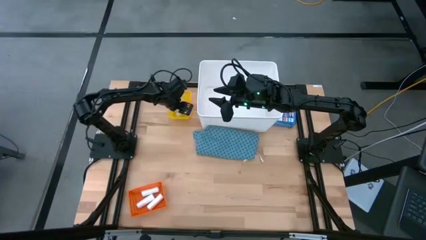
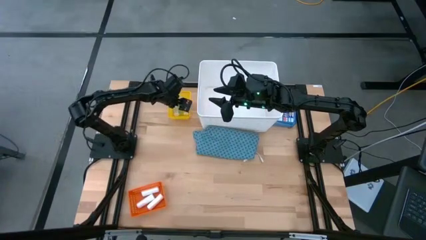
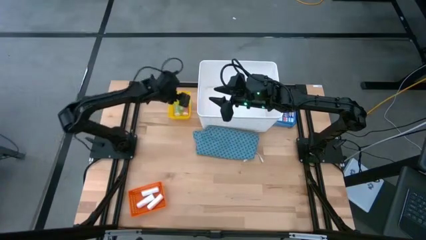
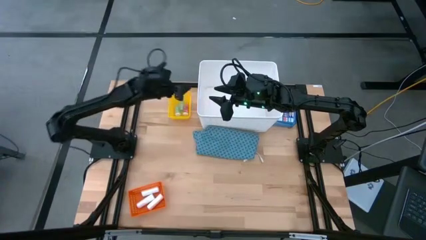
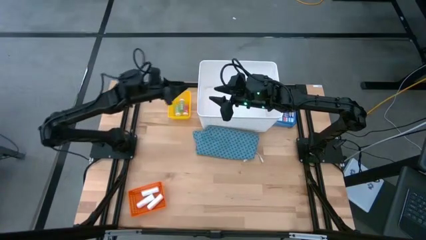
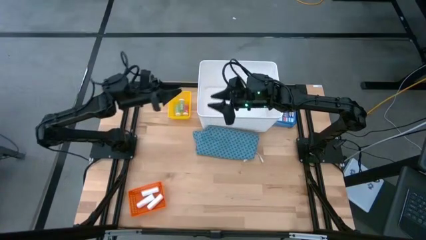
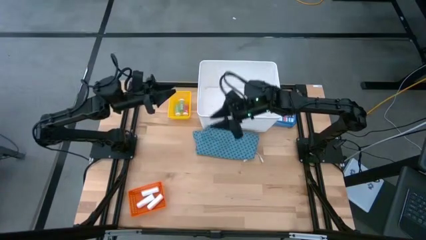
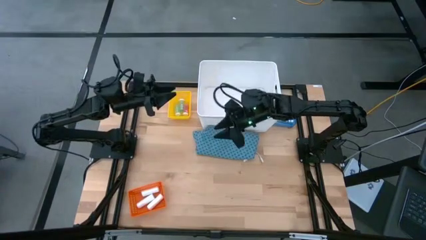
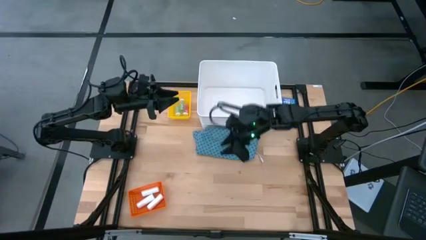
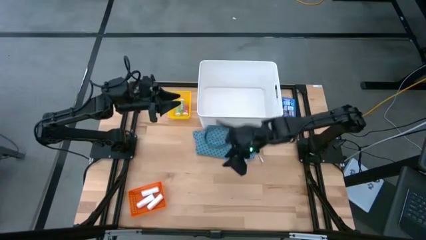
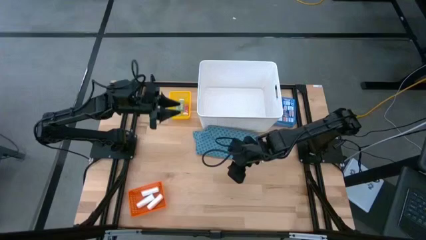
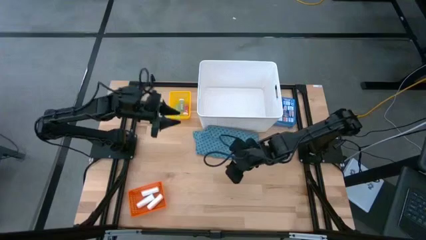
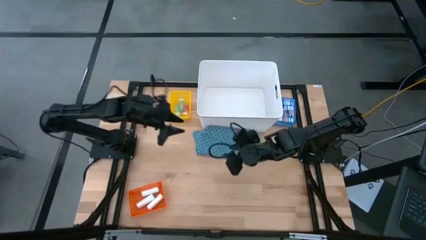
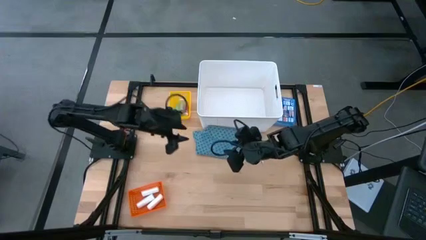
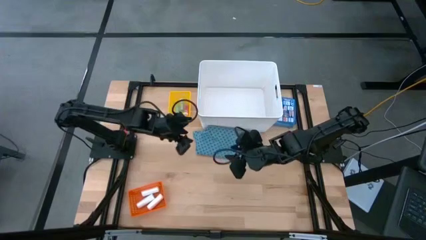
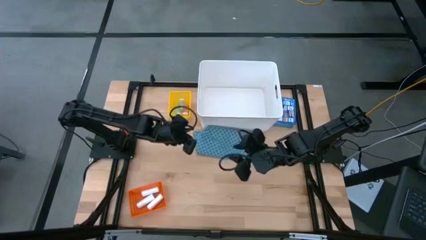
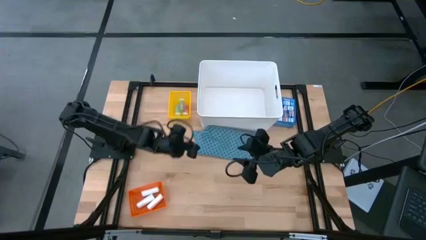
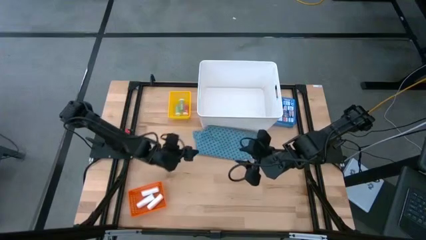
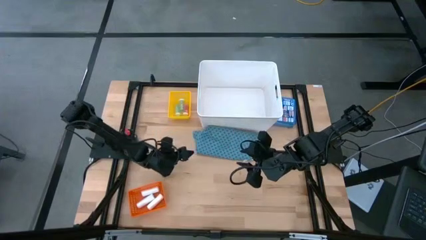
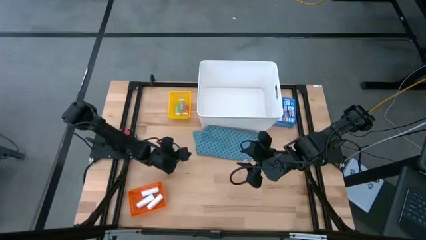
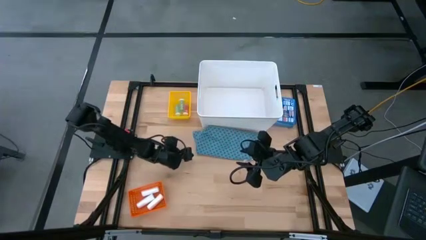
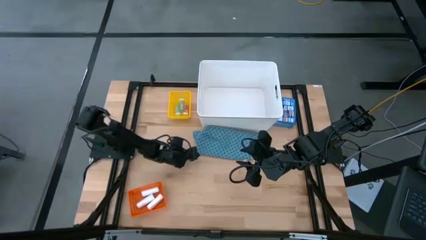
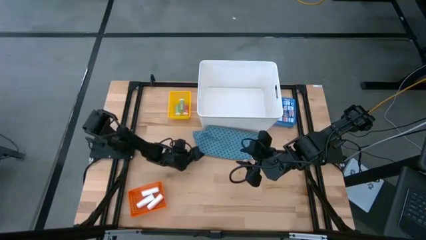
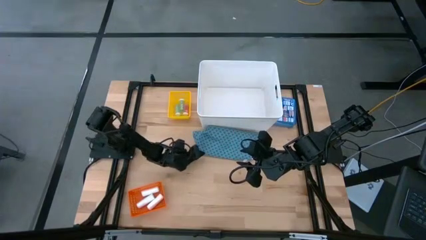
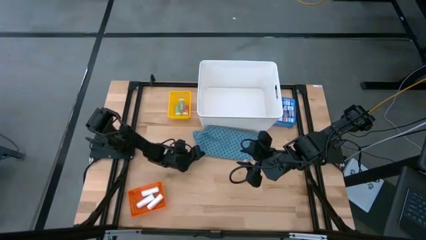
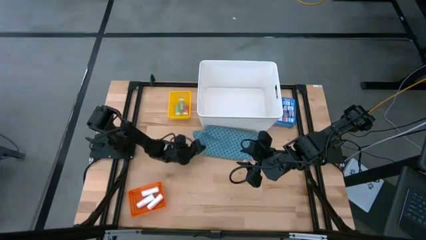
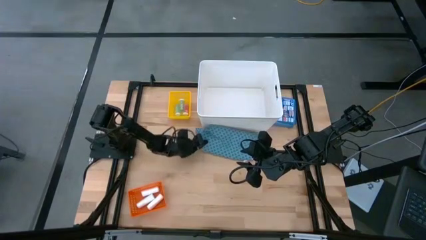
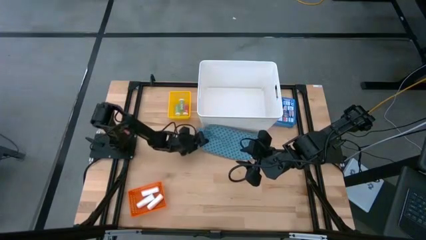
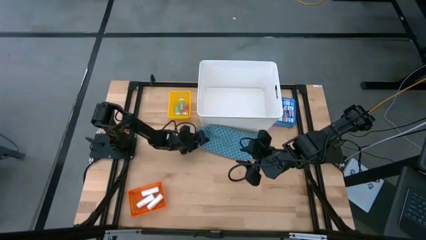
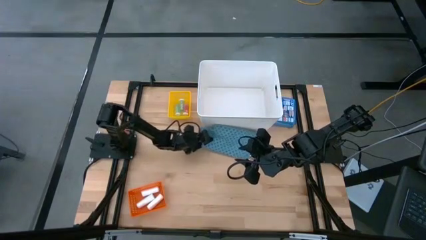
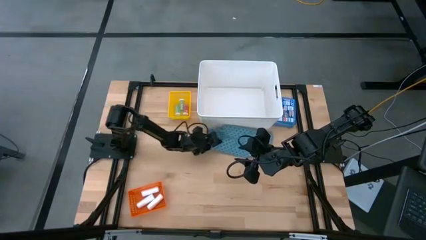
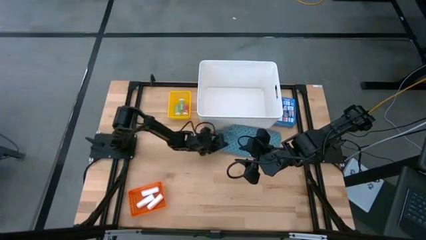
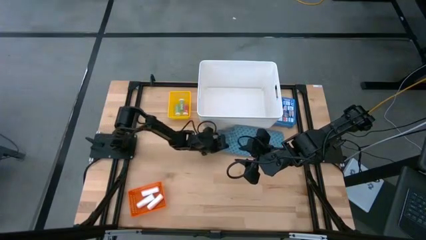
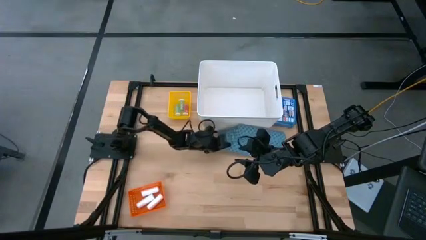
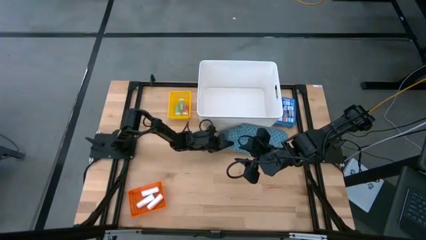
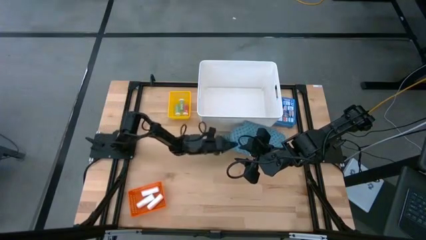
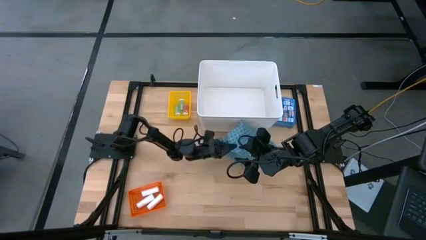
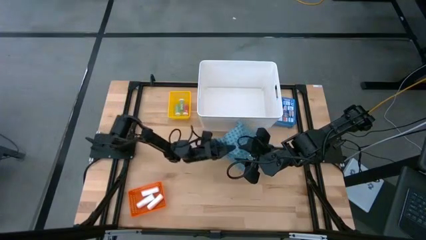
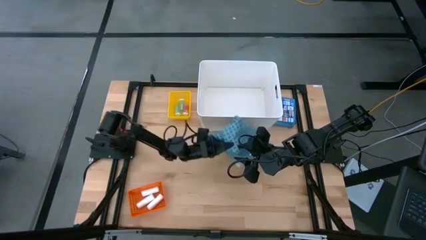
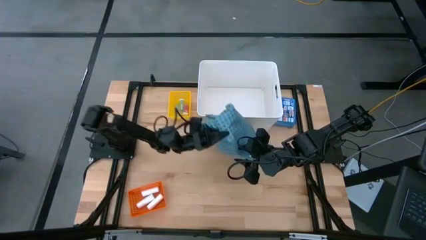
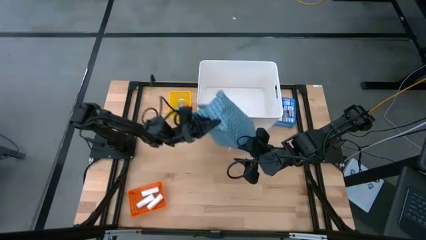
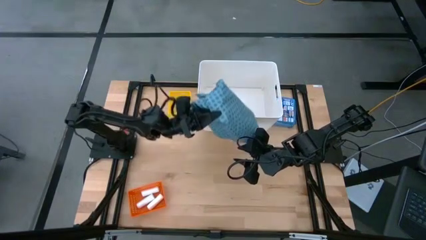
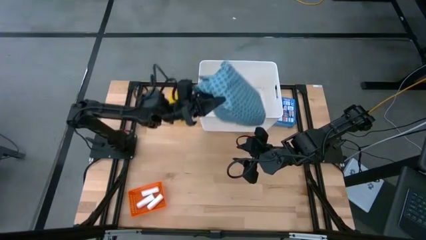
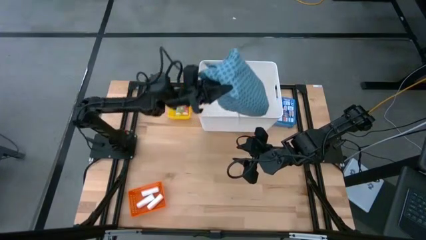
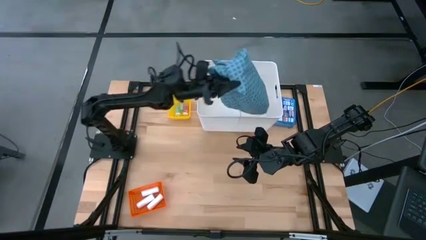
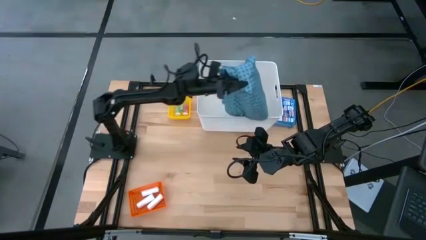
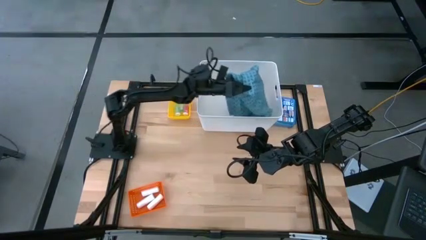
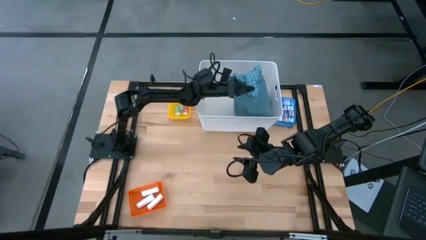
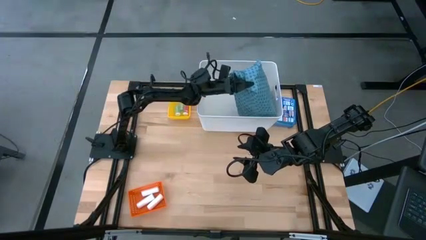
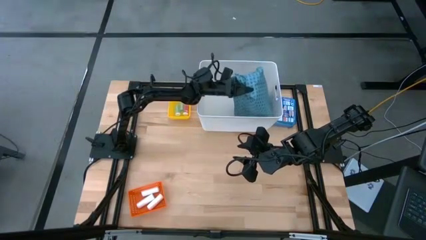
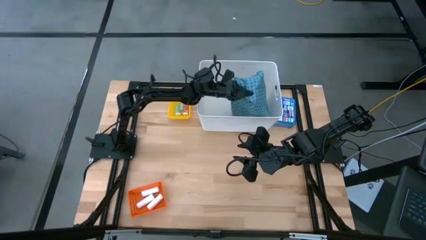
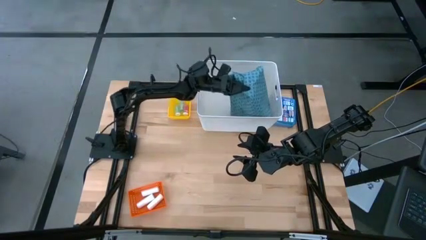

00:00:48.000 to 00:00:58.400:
Task: Pick & place medical supplies in basket/bin
Put the blue gown into the white bin

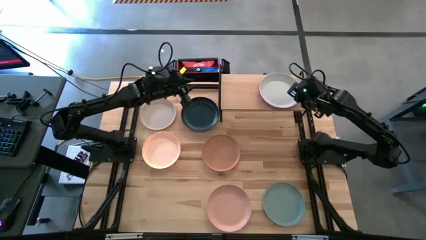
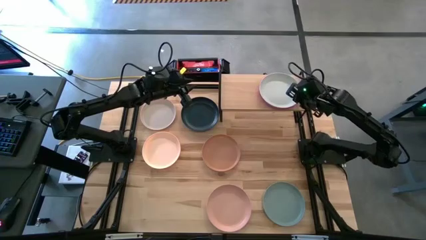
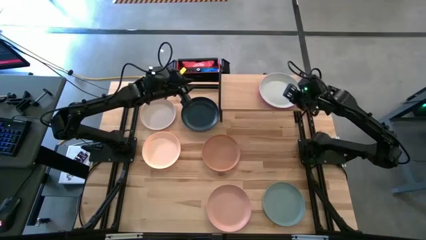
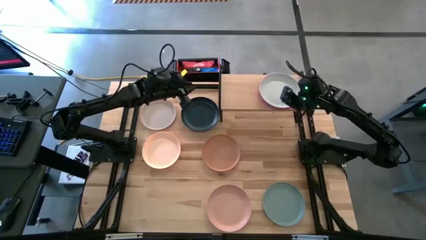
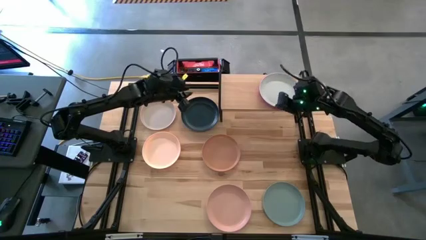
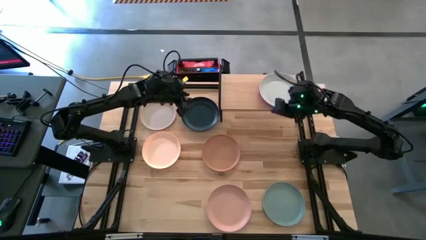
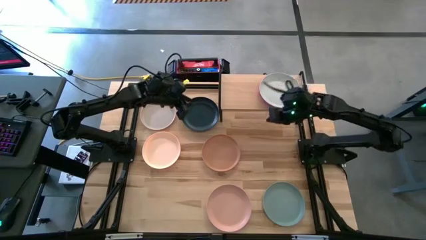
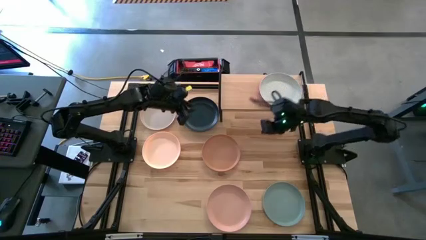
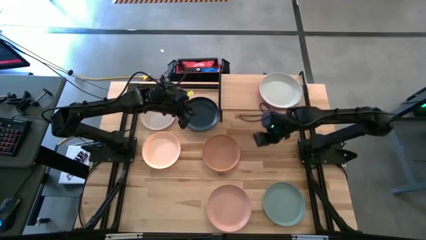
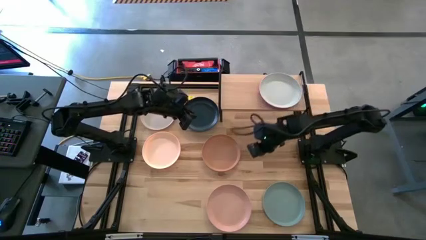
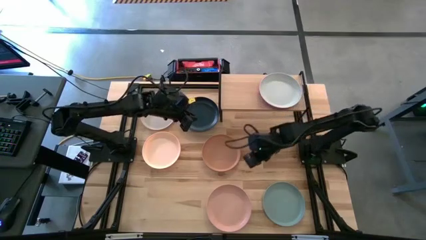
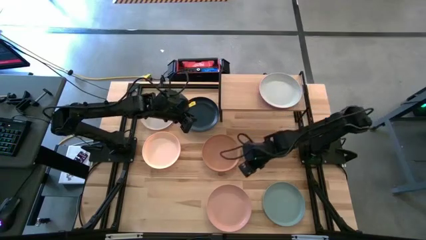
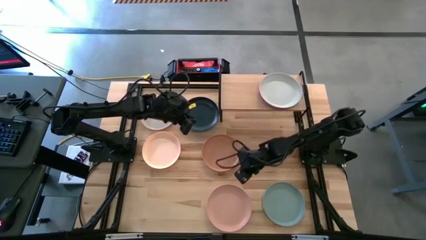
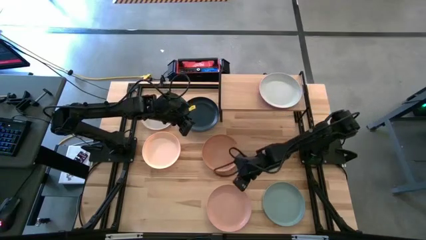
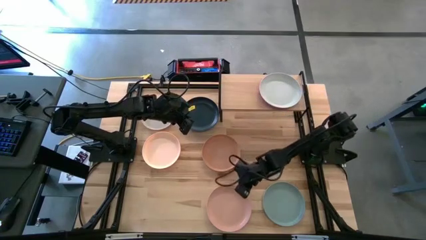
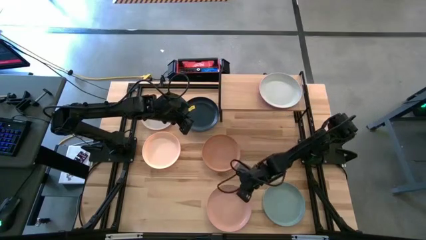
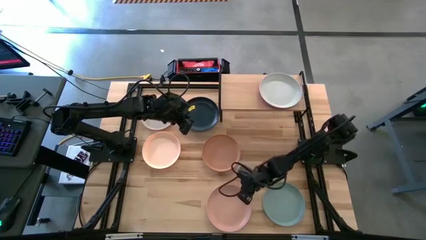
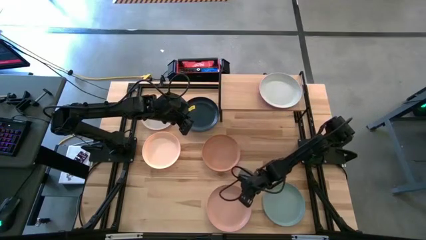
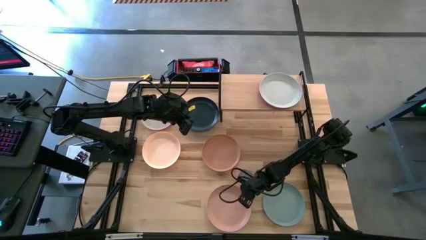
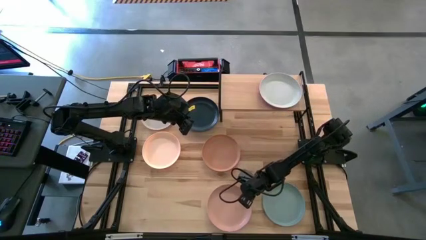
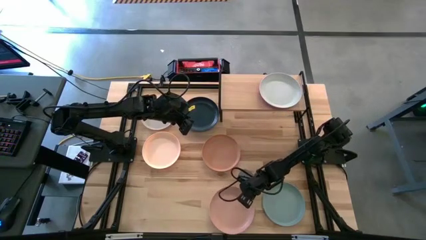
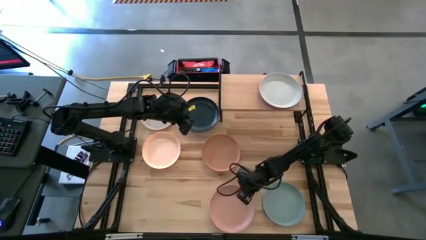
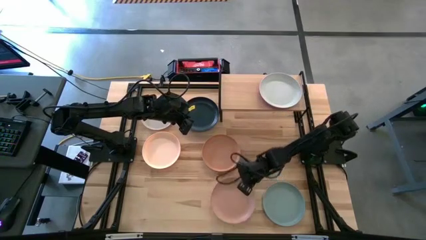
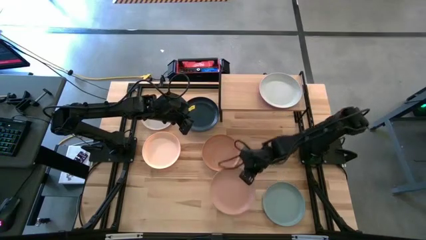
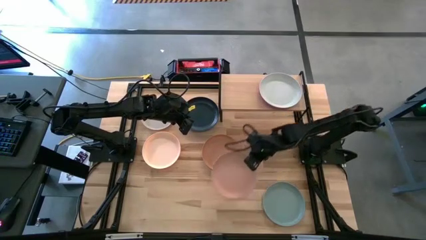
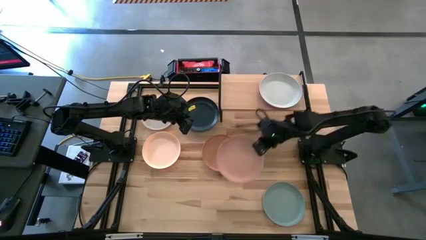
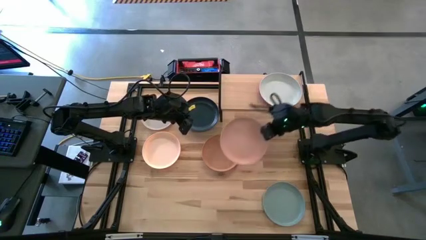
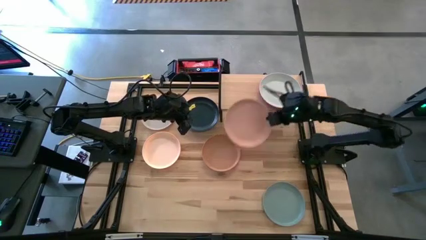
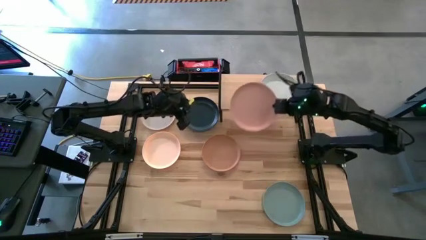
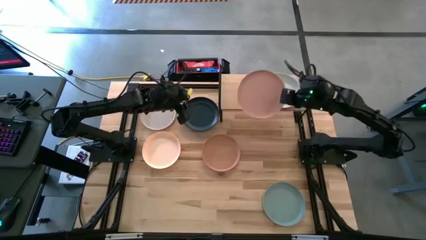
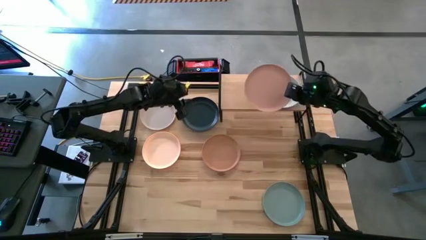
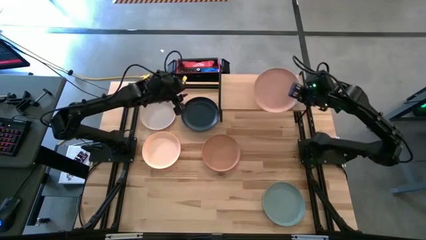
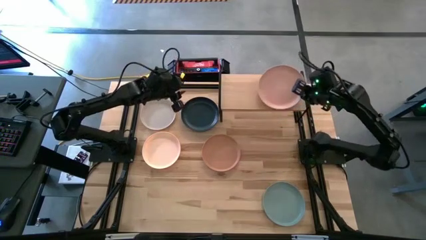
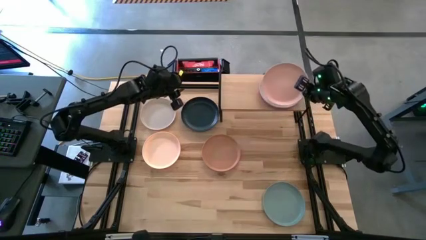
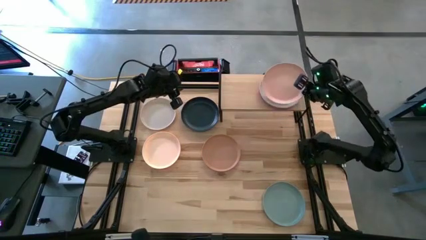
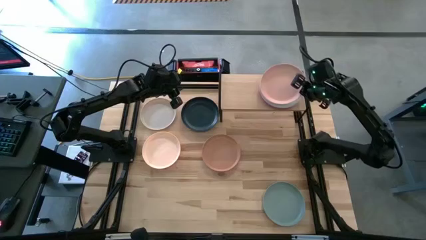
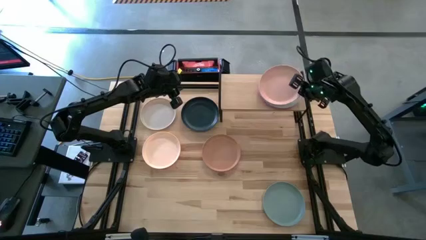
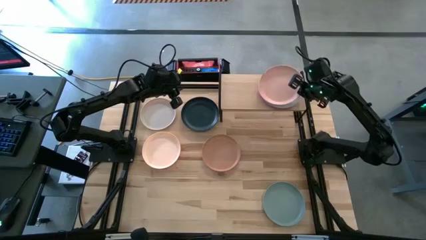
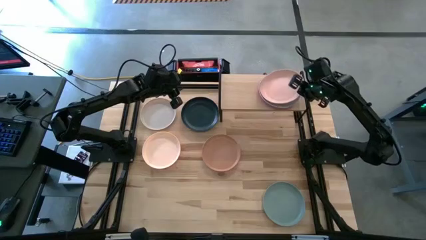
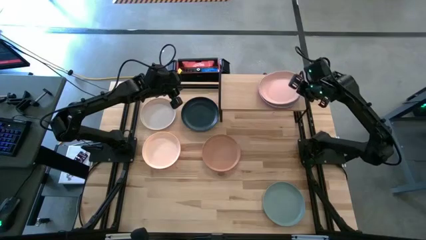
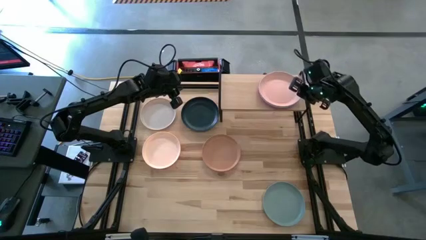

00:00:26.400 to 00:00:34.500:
Task: Place and stack plates onto a shelf
Stack the light pink plate on top of the gray plate on the shelf
